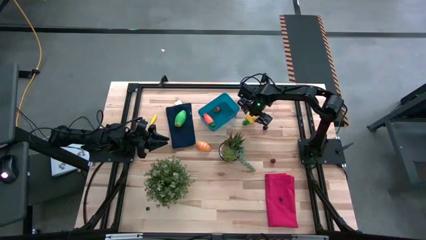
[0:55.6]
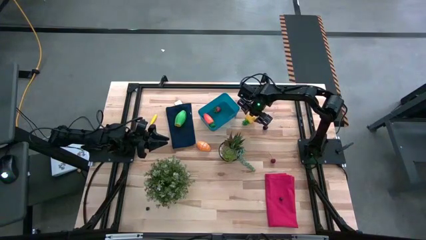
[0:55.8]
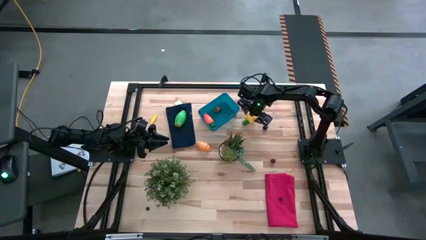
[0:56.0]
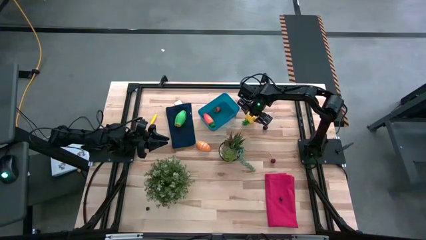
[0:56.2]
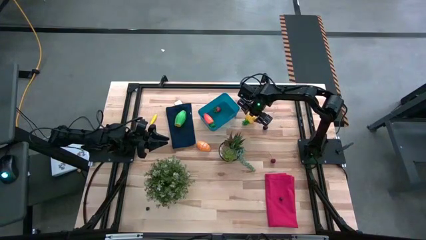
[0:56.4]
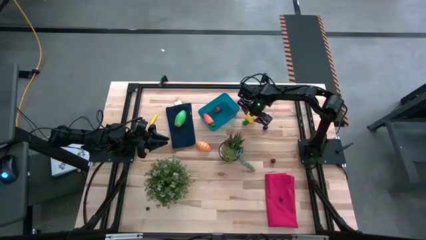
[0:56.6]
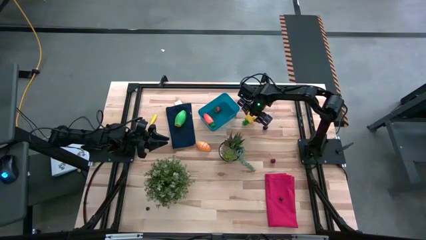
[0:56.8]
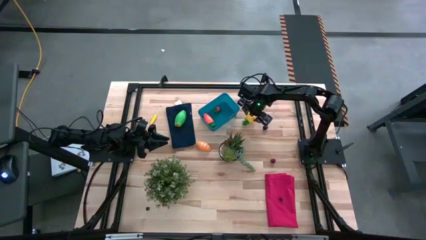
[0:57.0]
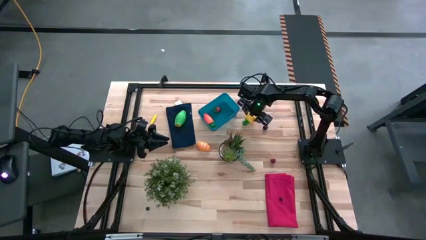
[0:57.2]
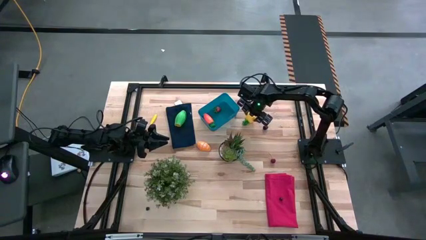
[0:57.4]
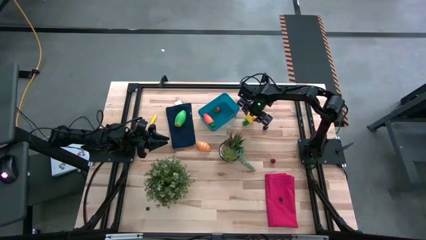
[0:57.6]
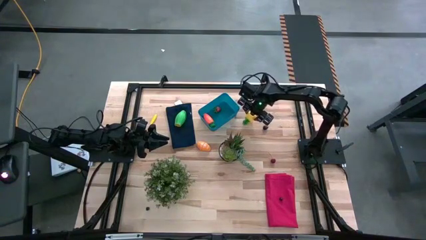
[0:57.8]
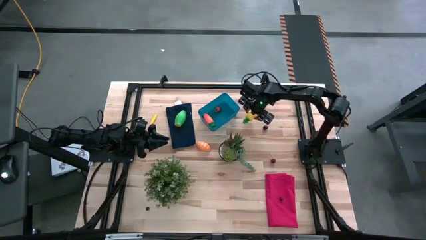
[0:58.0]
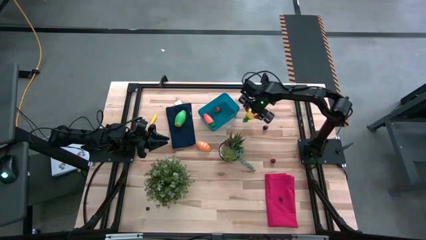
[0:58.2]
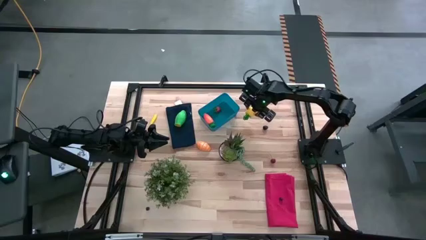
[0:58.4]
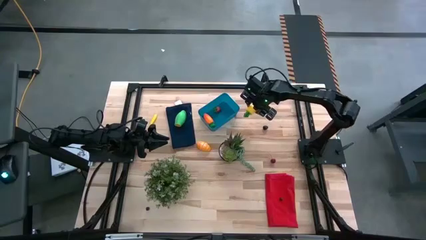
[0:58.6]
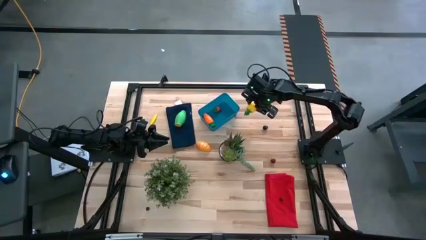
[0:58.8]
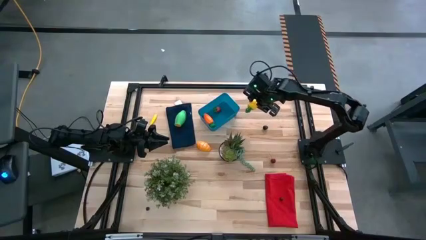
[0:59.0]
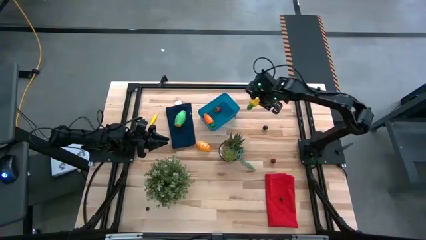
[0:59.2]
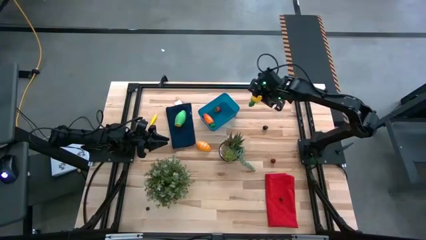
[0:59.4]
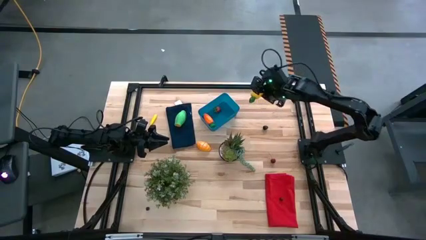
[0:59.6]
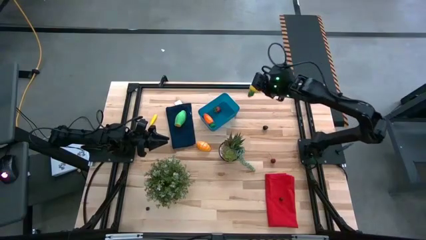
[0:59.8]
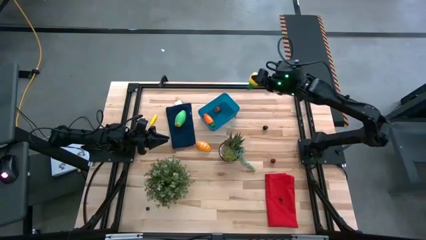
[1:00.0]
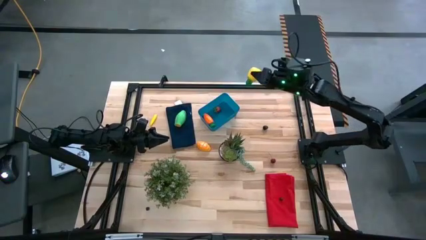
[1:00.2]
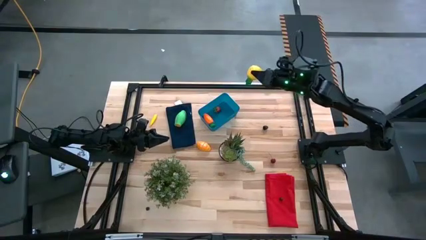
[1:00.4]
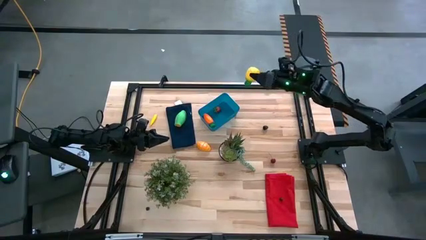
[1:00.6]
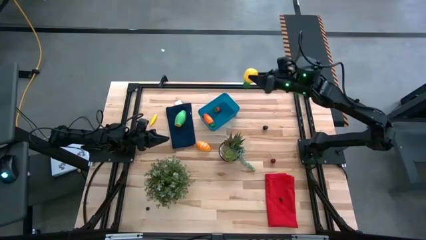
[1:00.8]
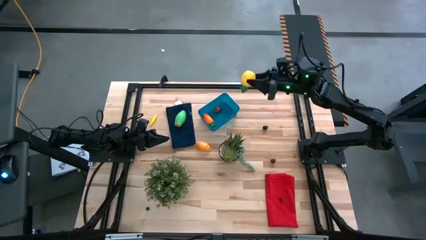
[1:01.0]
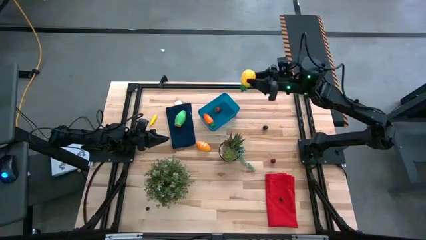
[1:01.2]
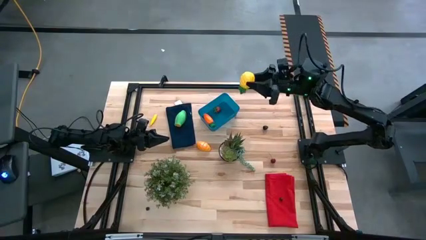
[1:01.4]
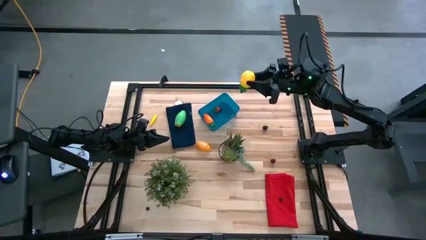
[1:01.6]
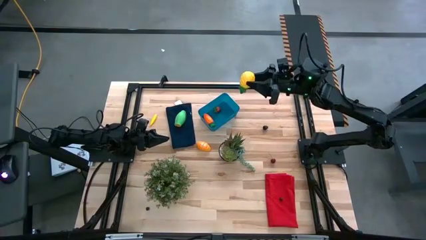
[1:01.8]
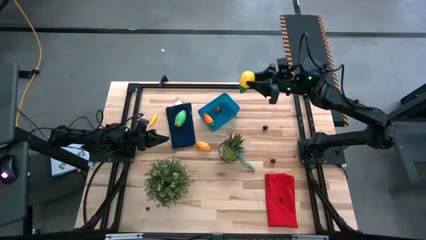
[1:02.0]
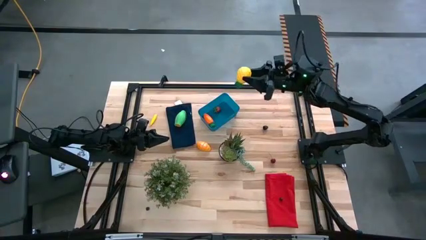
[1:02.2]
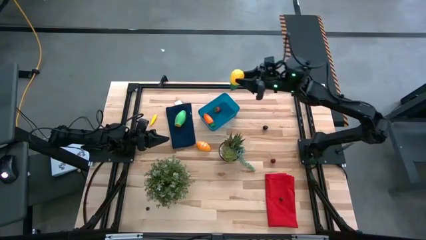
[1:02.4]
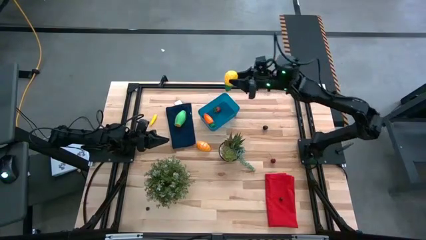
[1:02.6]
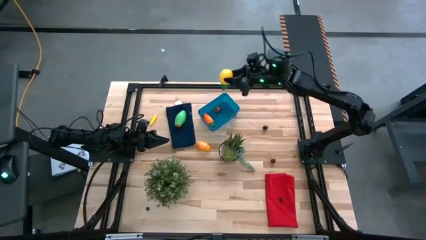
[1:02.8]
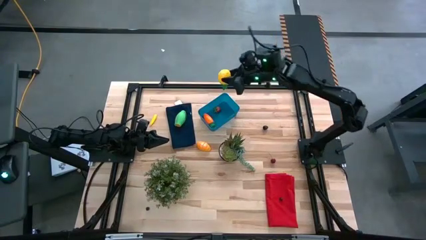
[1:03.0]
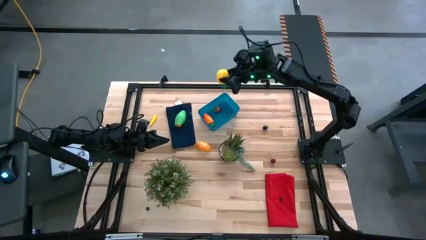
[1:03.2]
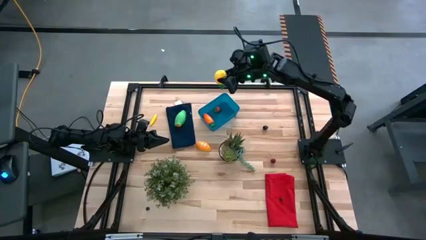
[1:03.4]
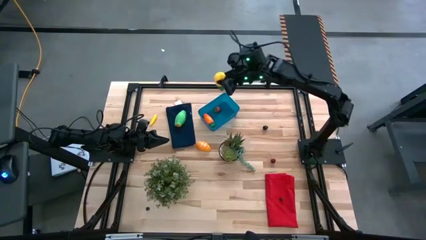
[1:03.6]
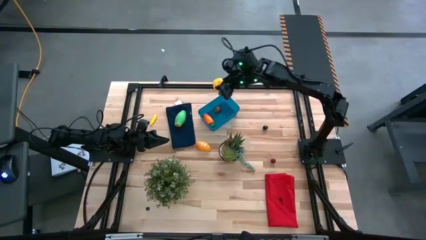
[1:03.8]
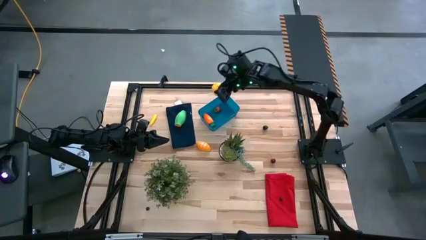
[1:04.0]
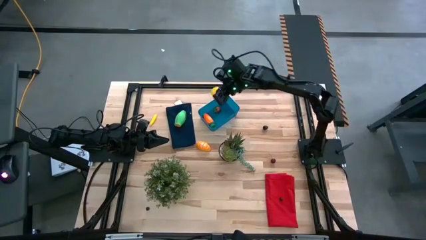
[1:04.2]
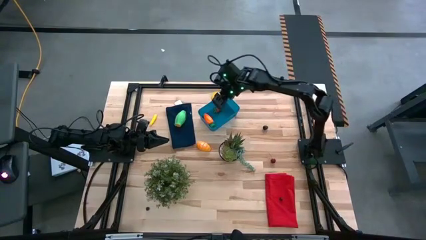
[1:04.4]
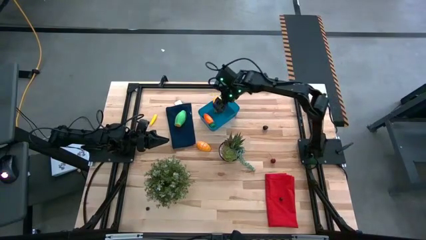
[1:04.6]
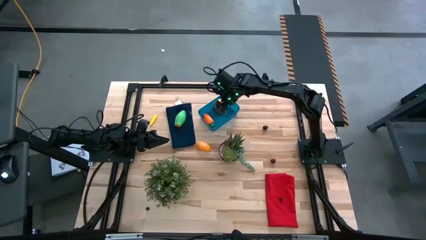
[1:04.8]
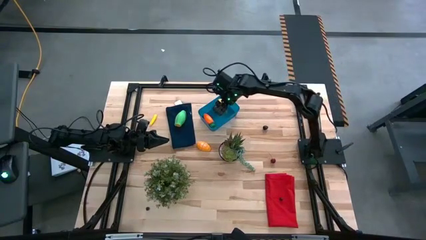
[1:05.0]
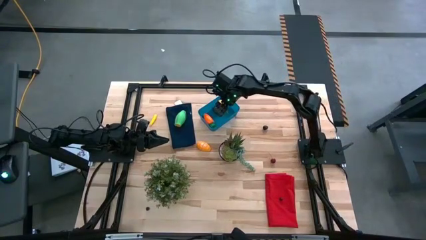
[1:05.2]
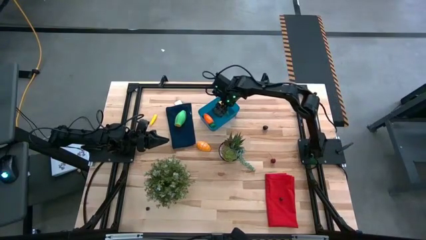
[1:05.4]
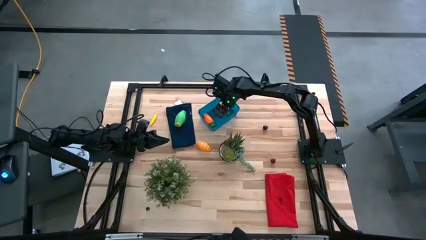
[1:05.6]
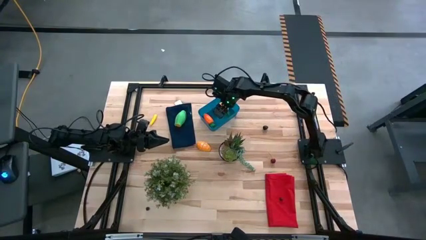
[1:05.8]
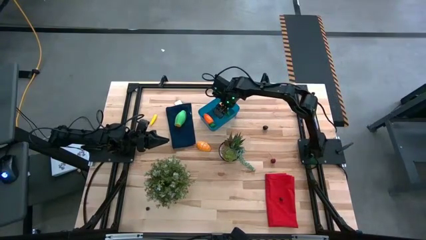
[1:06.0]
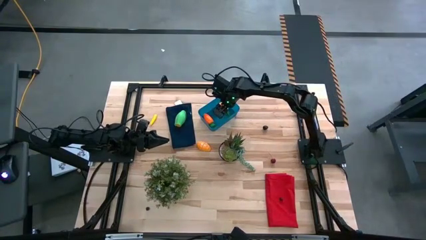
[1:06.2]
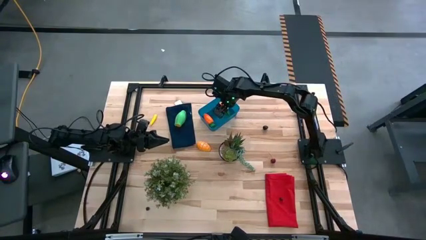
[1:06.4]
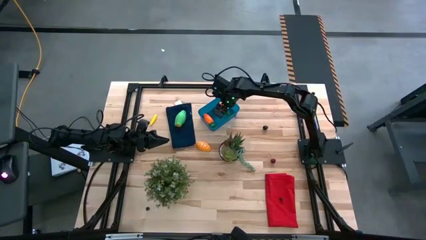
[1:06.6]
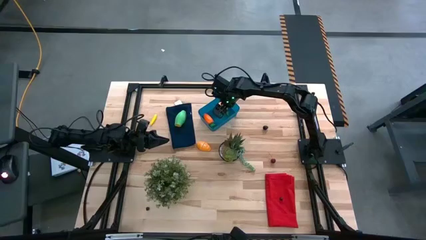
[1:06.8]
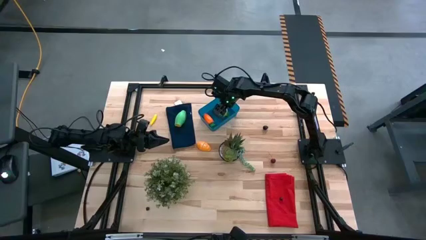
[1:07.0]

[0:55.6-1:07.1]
Task: Pick and placing Produce into tupperware
Put the yellow pineapple into the blue bin

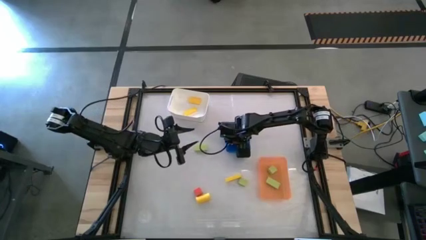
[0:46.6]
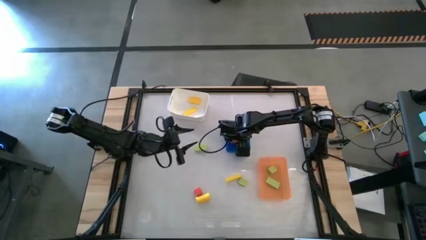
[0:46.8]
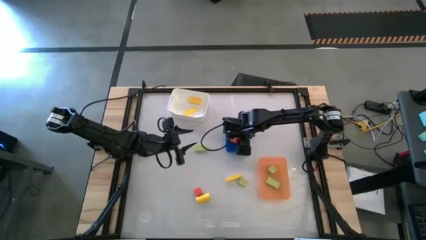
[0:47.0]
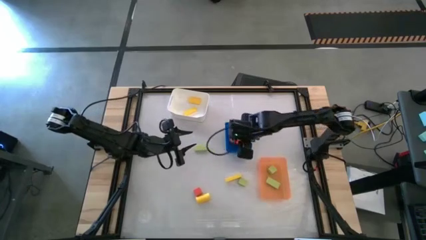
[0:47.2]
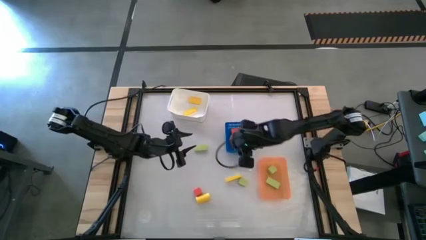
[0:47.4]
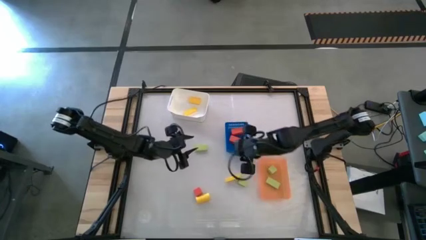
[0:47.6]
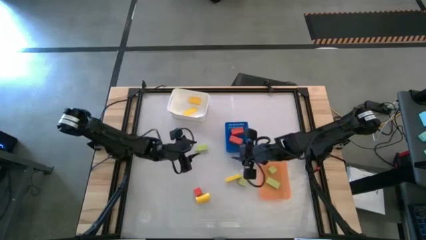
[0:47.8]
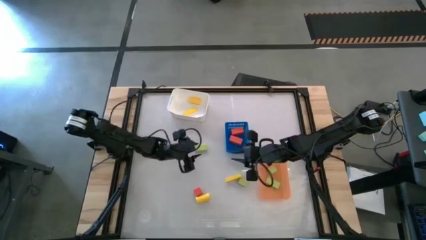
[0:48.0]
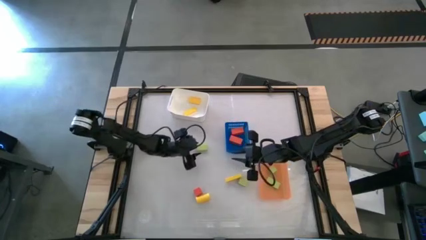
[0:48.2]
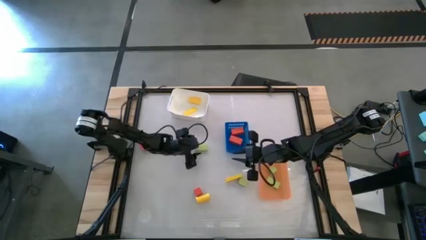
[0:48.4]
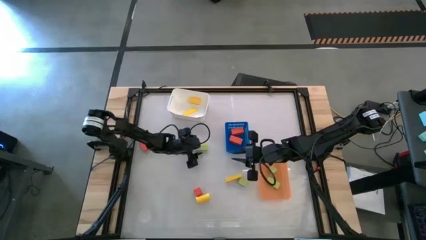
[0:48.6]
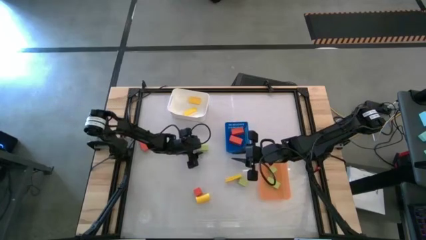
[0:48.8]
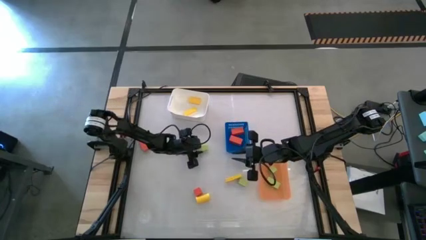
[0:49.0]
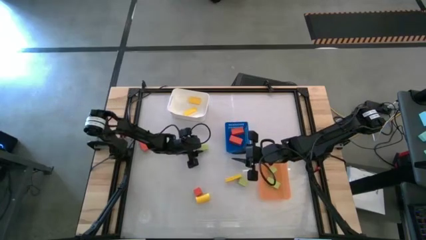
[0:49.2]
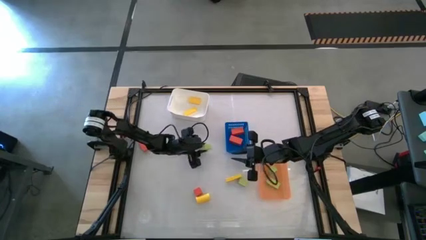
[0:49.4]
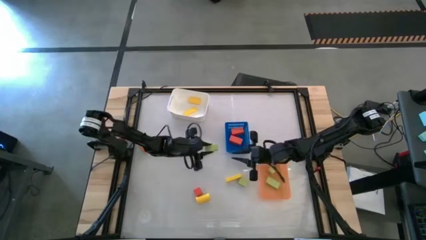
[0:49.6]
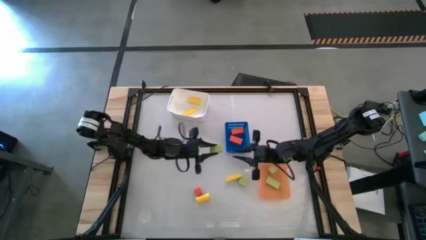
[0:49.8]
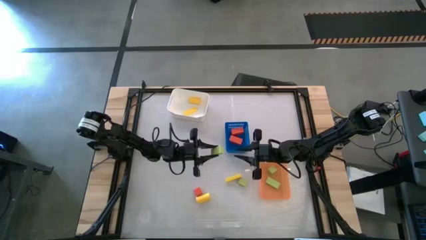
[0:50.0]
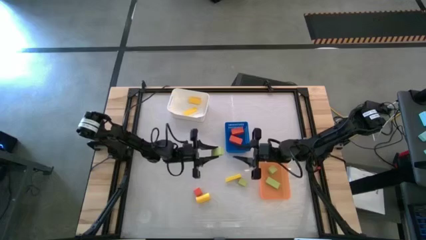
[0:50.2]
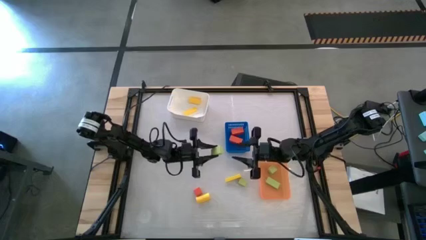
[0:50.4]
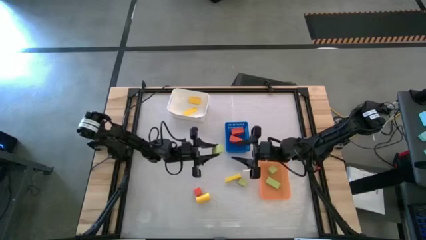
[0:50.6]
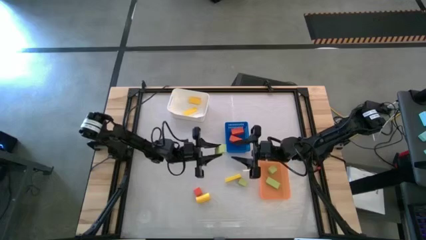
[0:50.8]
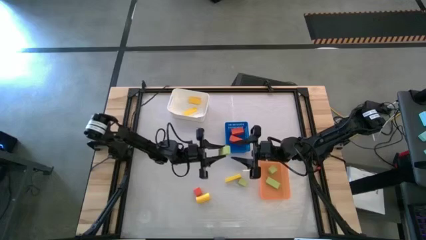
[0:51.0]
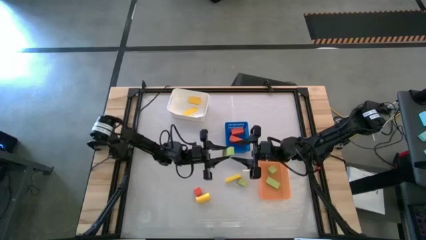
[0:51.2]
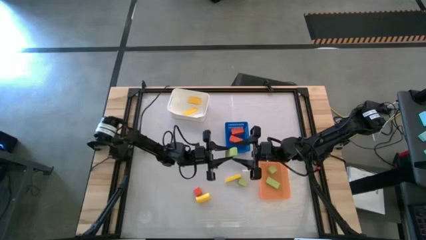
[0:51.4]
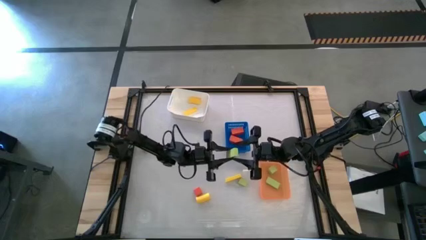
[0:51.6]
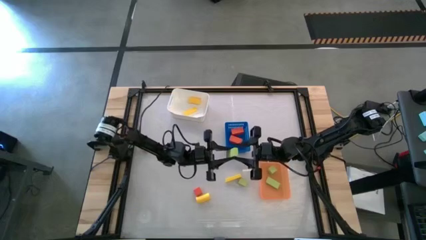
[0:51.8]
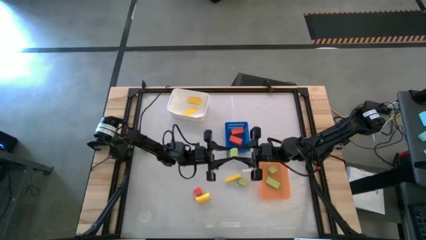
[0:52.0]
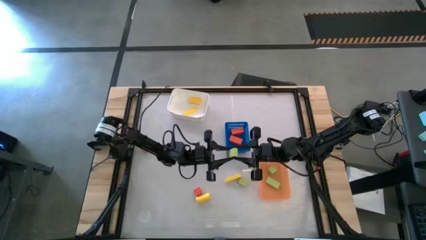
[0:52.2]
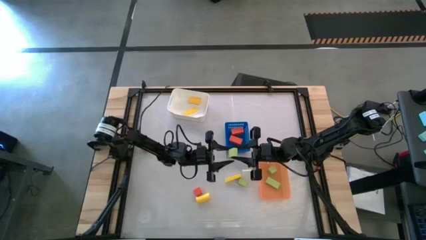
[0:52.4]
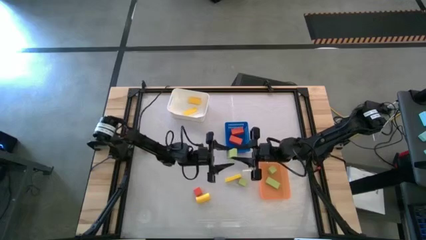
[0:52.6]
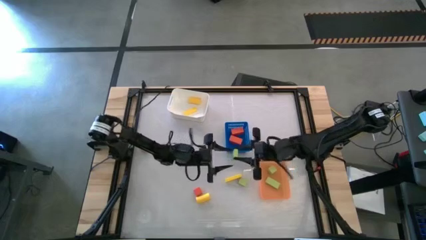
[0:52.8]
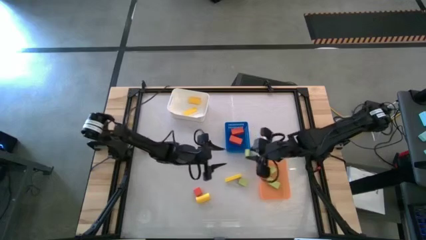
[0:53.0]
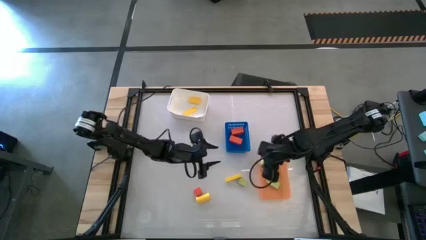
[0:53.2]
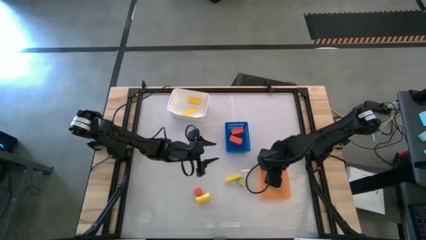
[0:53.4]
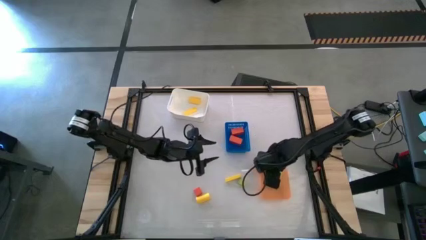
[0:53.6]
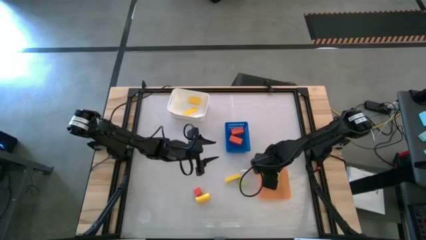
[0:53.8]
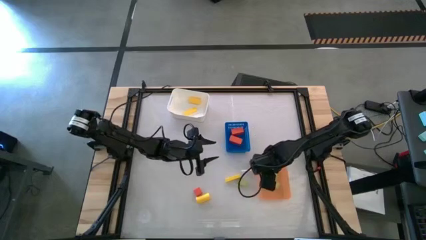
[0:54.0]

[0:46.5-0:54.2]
Task: Sort & place blocks by color
Put the green block into the orange bin
